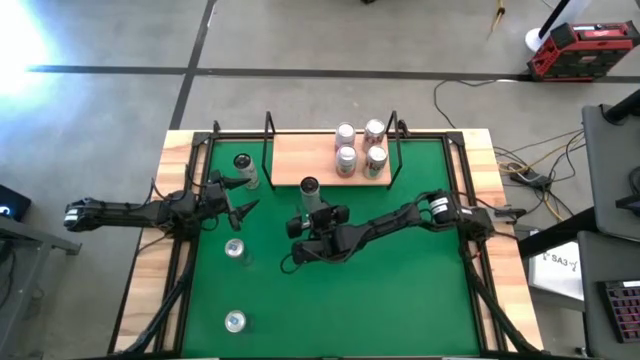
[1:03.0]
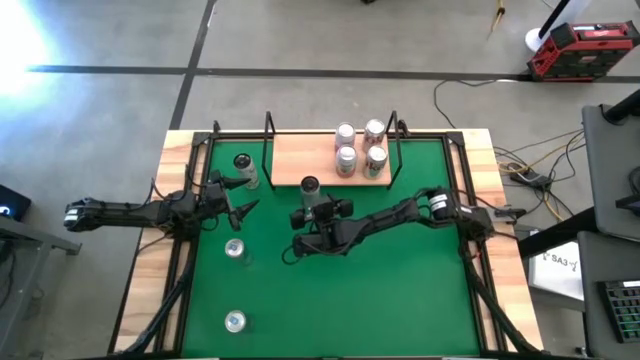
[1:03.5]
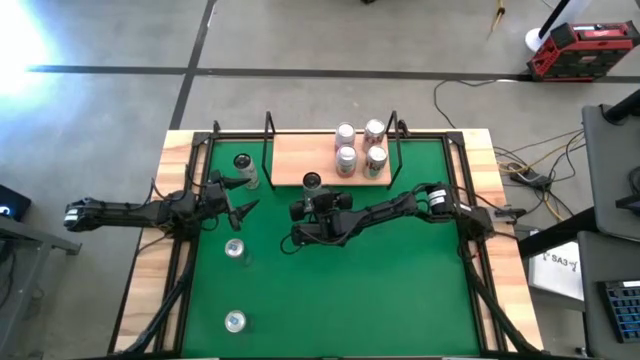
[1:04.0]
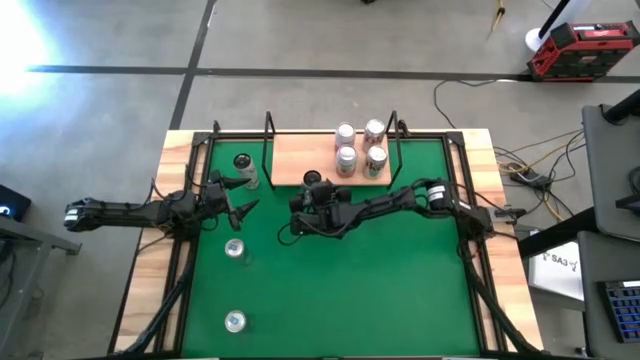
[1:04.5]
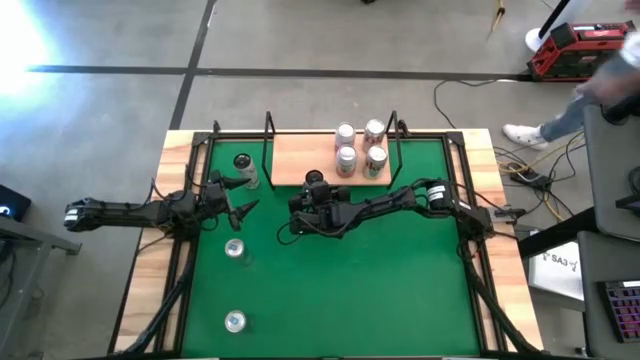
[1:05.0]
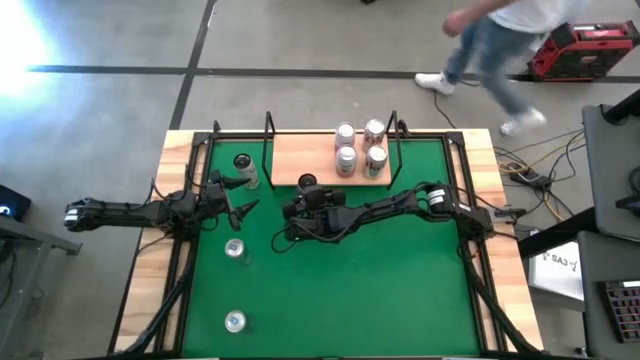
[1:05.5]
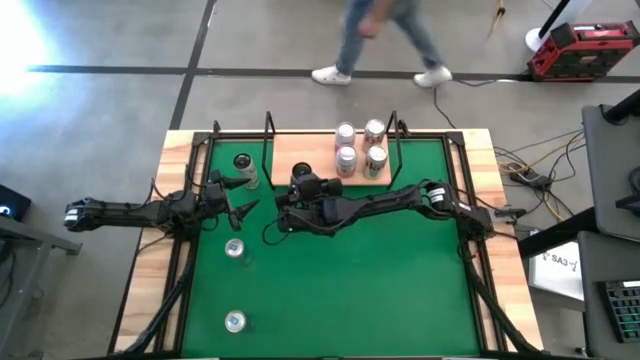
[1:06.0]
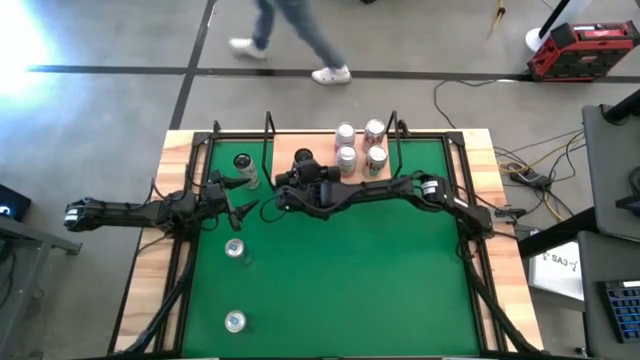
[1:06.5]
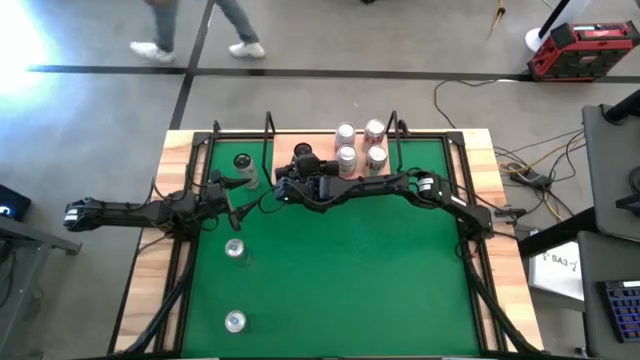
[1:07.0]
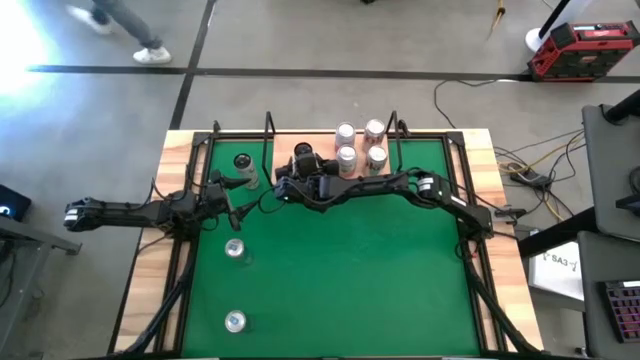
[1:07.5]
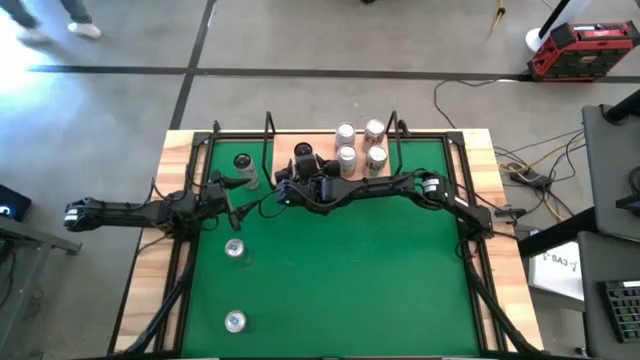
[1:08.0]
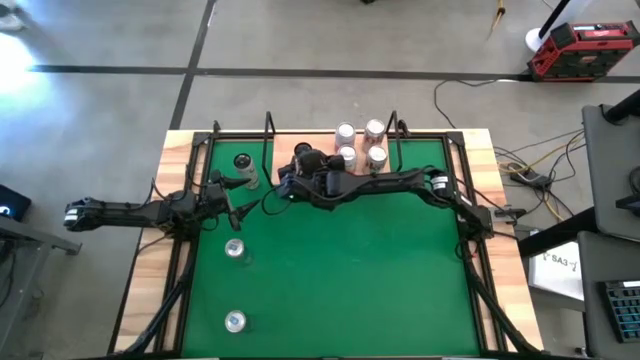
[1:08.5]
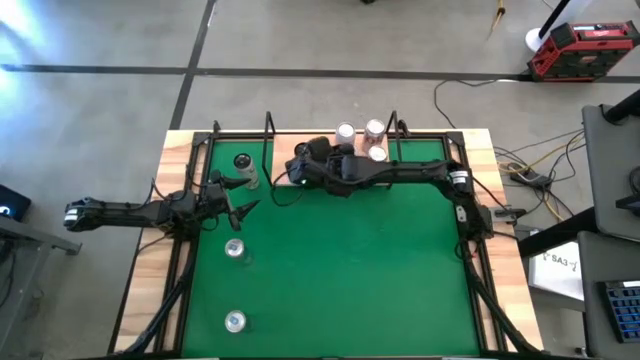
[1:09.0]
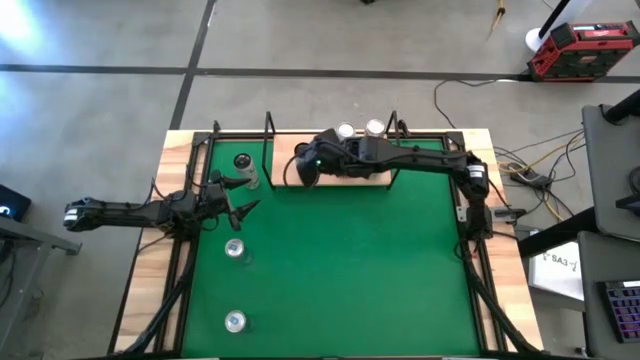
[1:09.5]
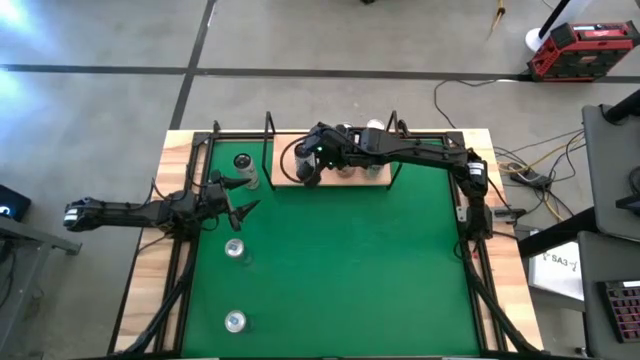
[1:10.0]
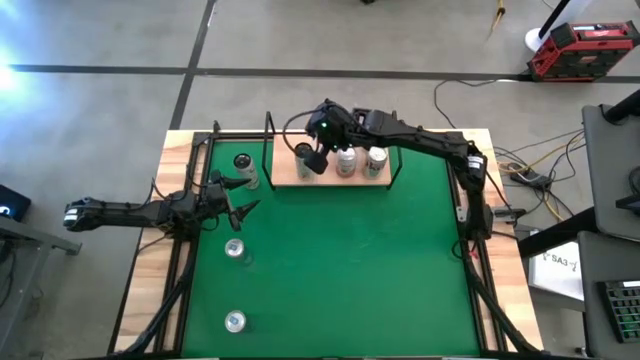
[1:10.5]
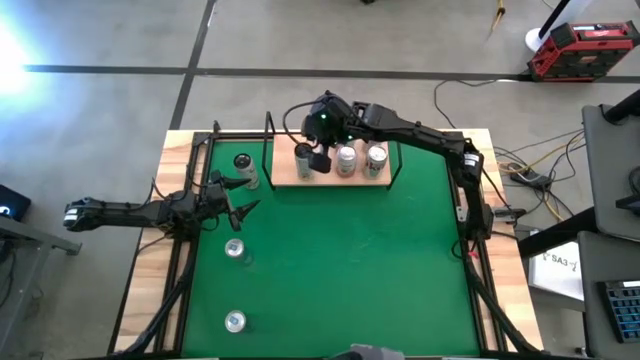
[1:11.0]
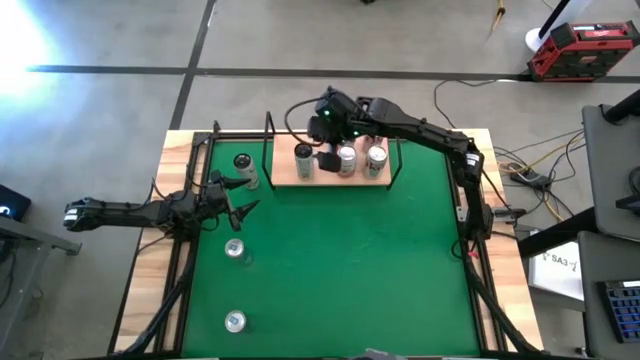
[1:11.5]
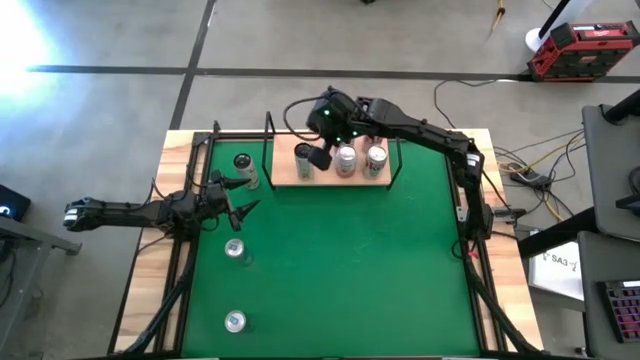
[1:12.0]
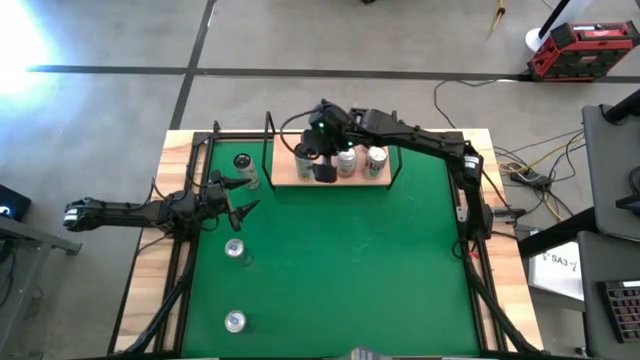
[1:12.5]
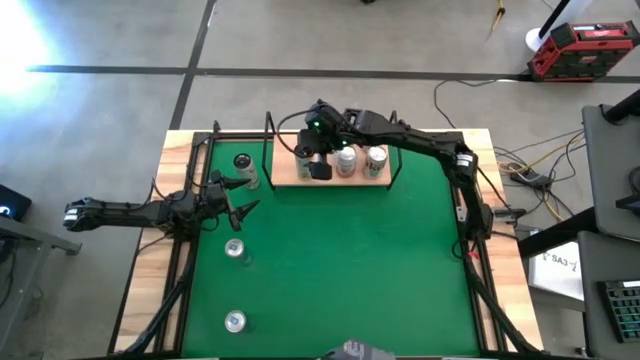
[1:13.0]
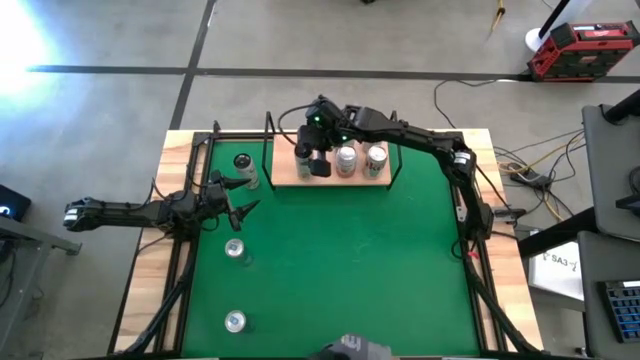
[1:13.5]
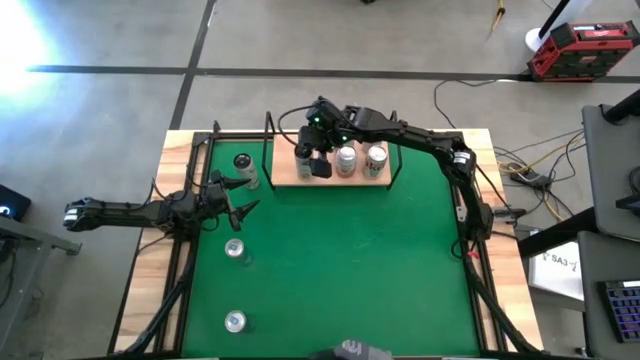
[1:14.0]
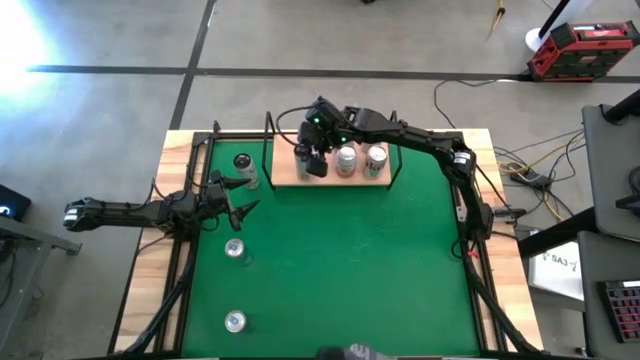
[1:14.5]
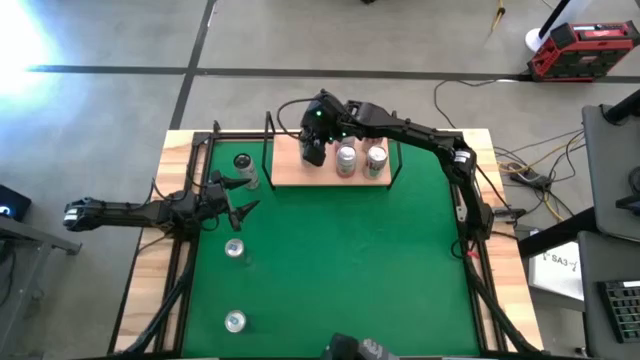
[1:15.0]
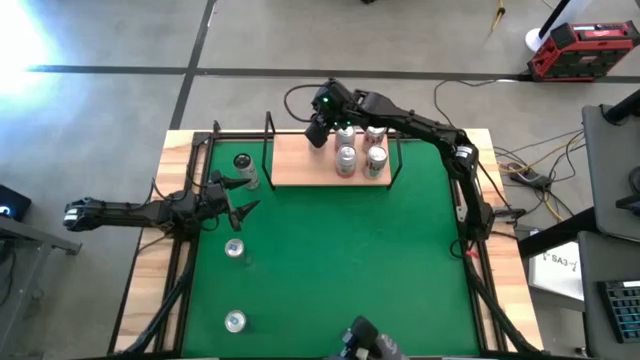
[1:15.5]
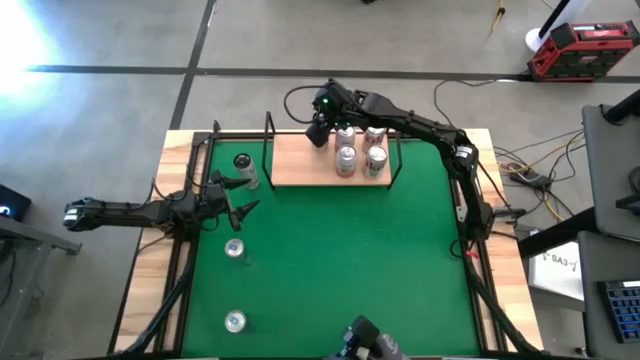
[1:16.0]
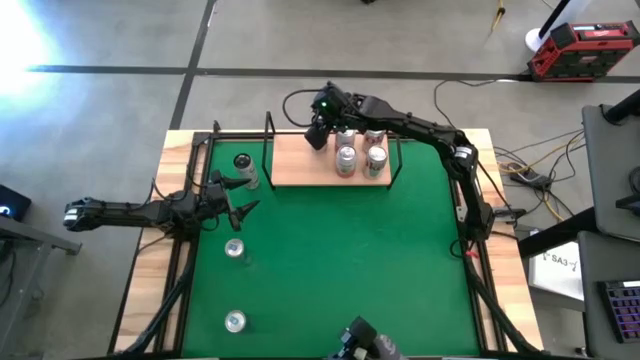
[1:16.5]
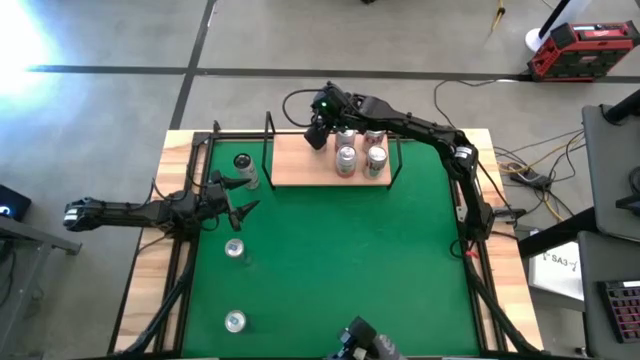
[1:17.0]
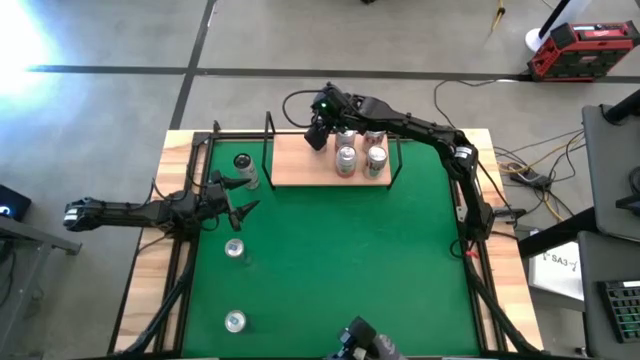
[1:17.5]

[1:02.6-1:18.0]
Task: Place canned beverage on shelf
Put the right black and white soda can on the shelf

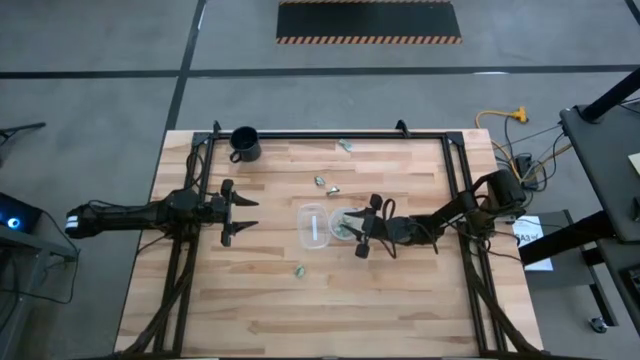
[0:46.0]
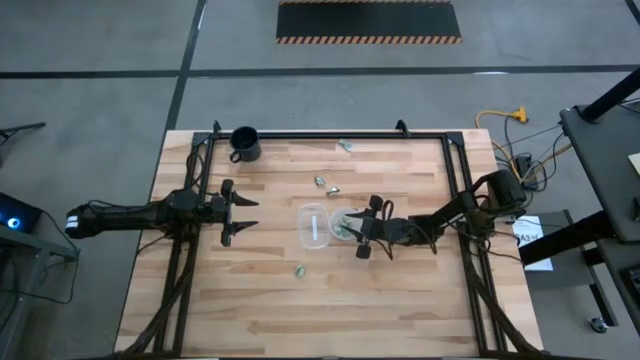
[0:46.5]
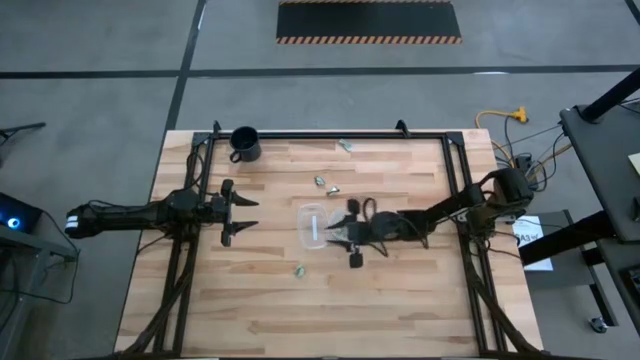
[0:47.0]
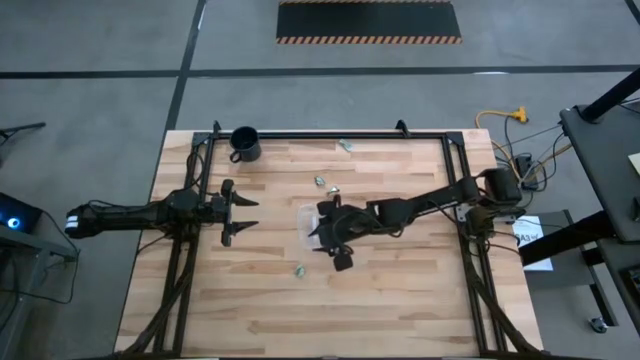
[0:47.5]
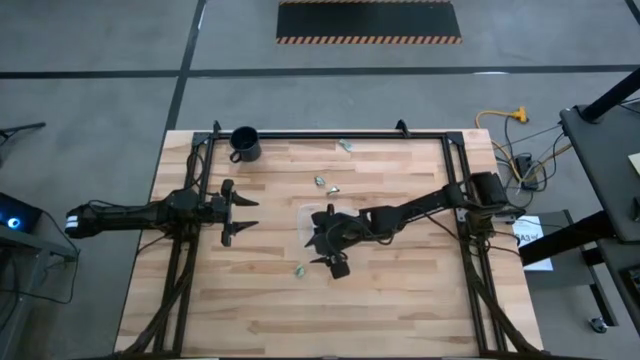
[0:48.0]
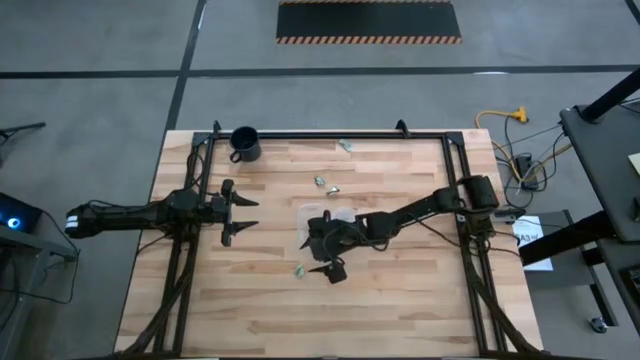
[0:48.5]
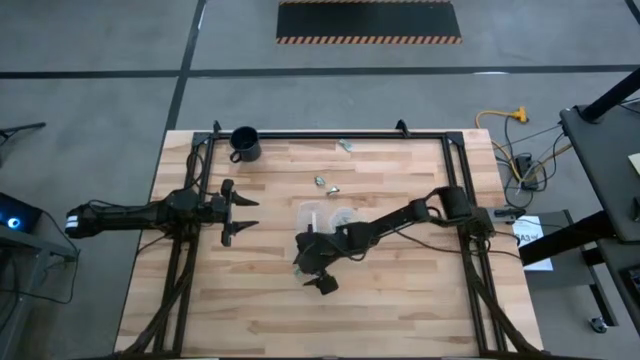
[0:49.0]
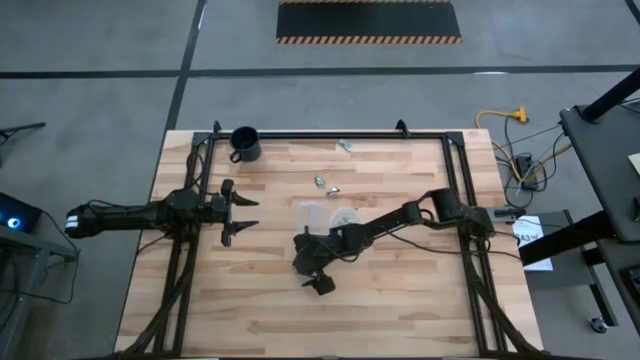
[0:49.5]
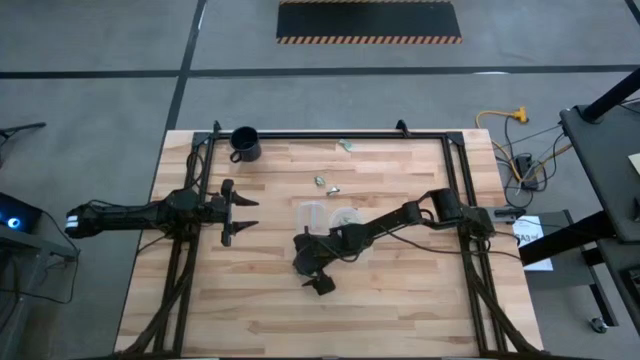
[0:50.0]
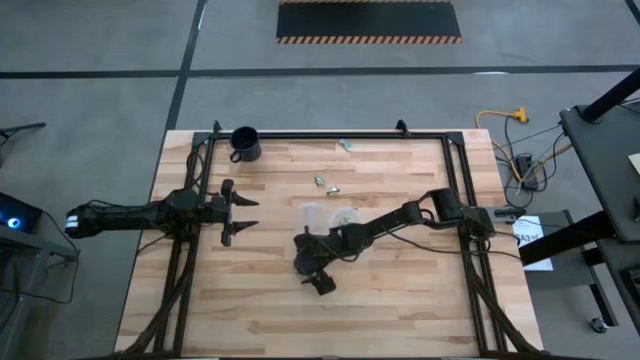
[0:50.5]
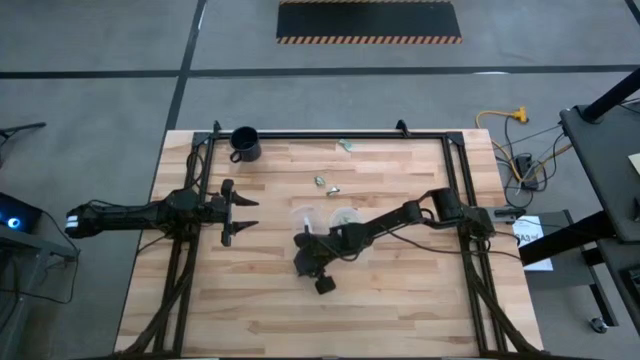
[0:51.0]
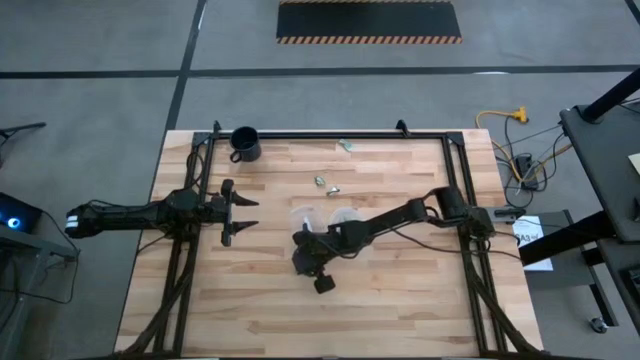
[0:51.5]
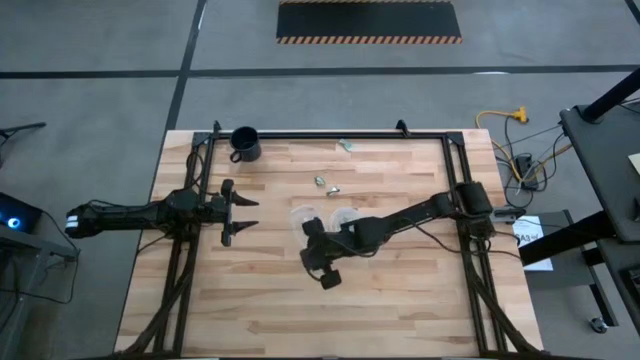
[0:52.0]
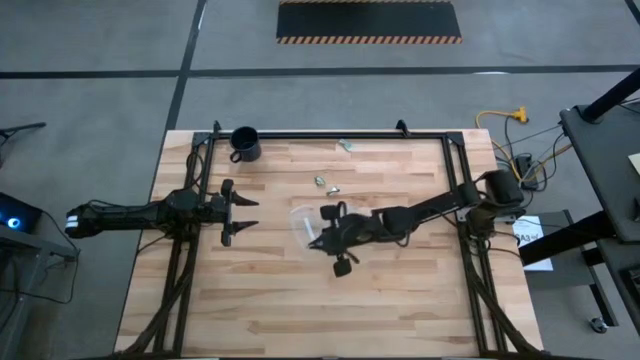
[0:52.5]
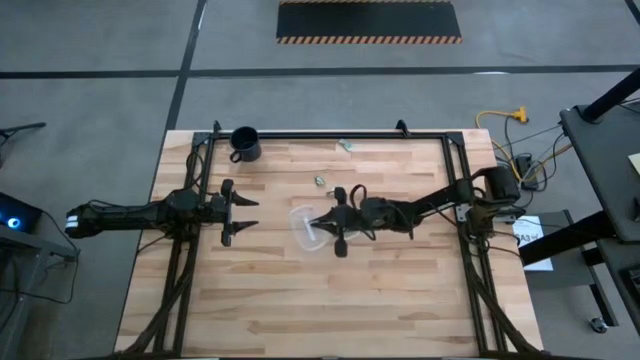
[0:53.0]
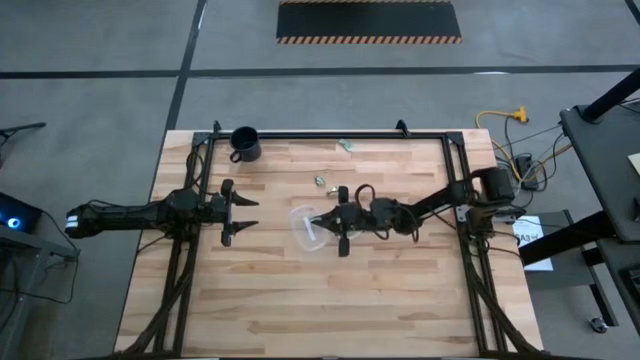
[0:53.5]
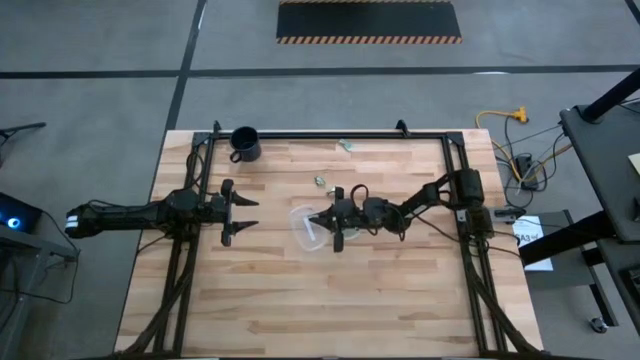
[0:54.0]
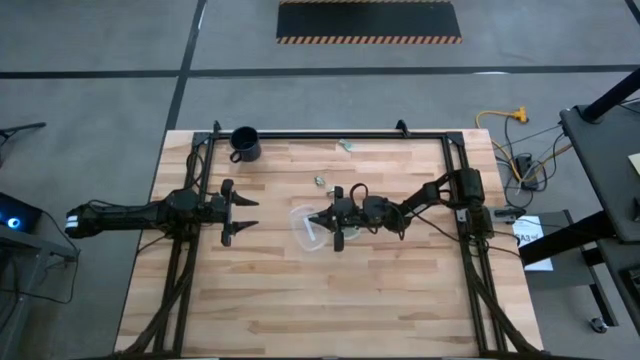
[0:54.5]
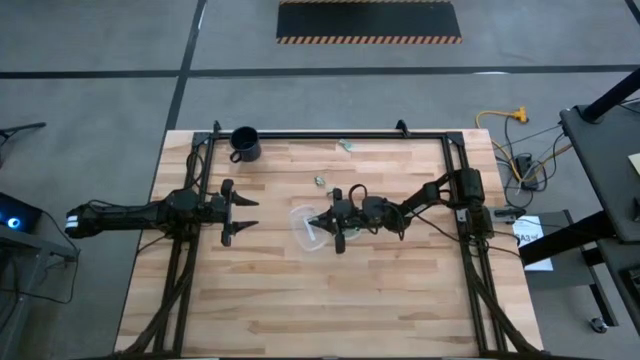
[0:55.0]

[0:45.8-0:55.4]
Task: Pick and place Stevia / Truvia into bins
Put the green stevia packet into the left transparent container
